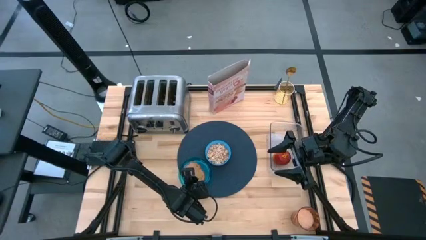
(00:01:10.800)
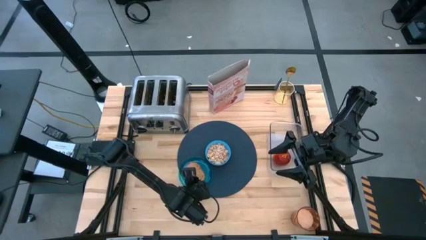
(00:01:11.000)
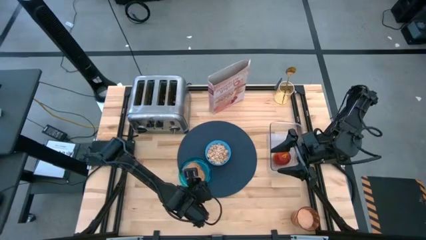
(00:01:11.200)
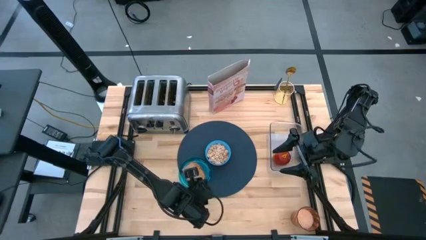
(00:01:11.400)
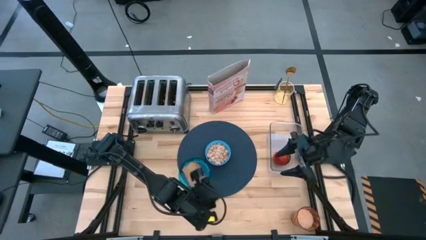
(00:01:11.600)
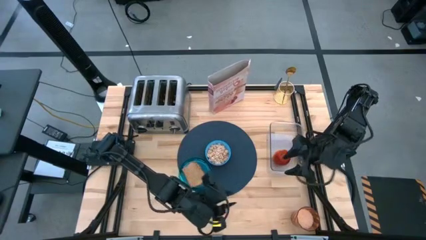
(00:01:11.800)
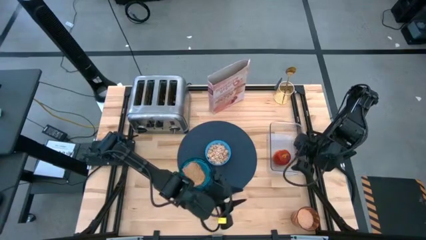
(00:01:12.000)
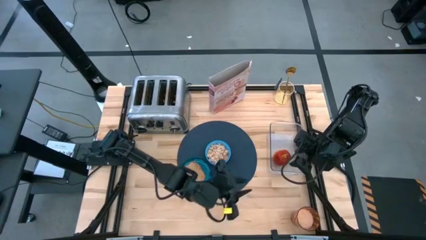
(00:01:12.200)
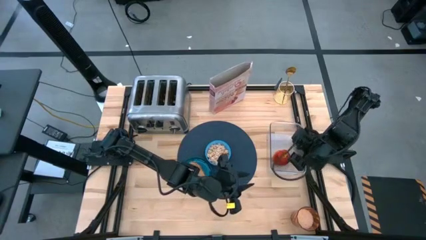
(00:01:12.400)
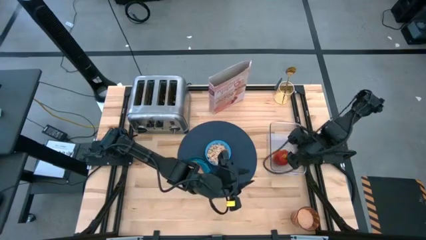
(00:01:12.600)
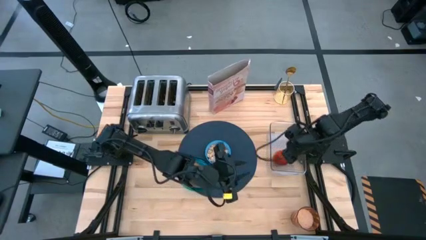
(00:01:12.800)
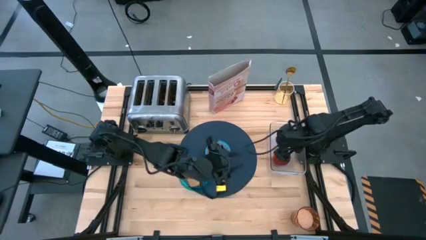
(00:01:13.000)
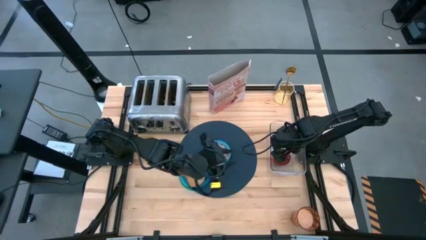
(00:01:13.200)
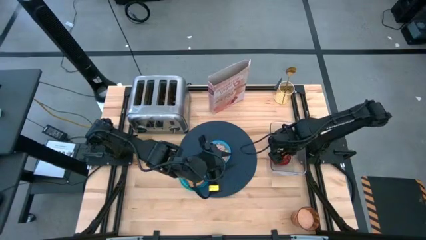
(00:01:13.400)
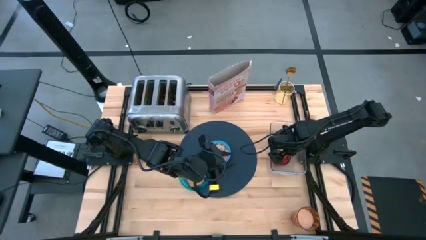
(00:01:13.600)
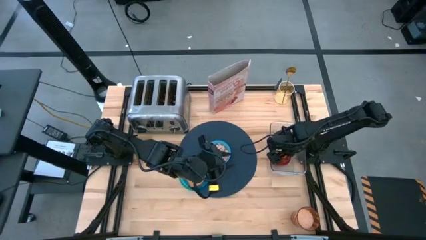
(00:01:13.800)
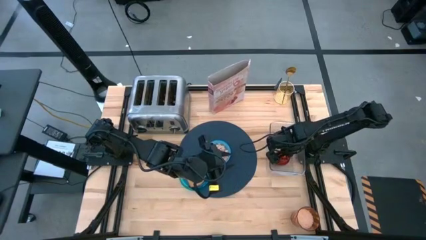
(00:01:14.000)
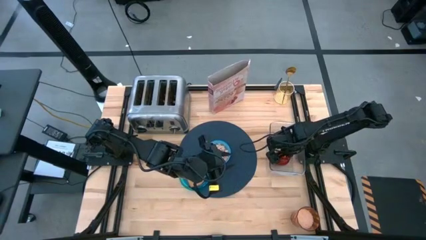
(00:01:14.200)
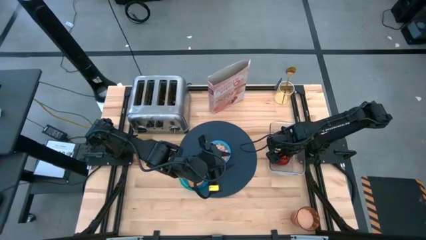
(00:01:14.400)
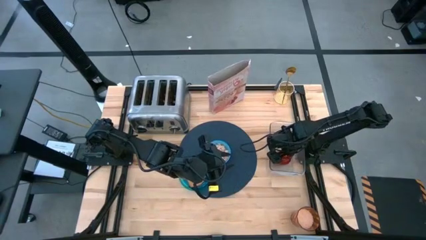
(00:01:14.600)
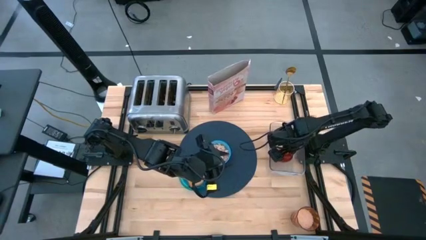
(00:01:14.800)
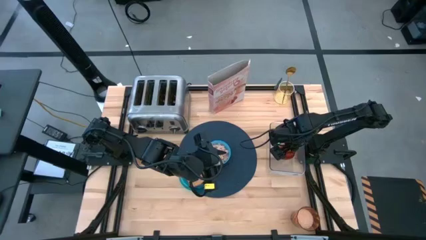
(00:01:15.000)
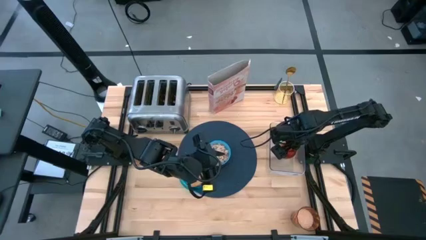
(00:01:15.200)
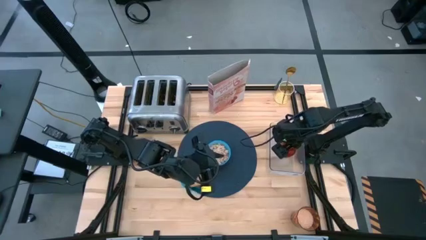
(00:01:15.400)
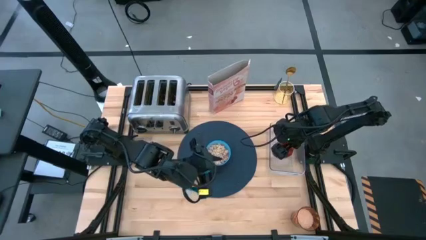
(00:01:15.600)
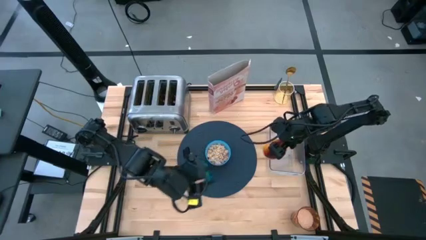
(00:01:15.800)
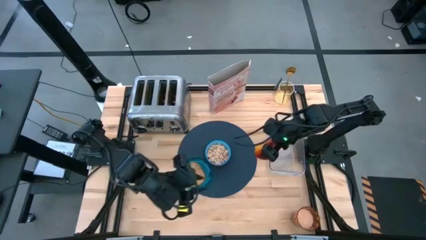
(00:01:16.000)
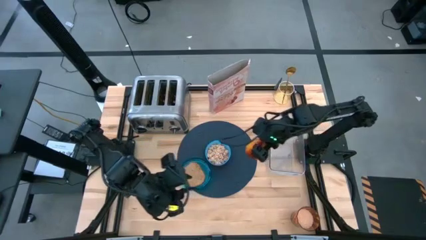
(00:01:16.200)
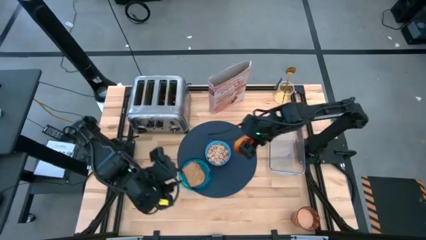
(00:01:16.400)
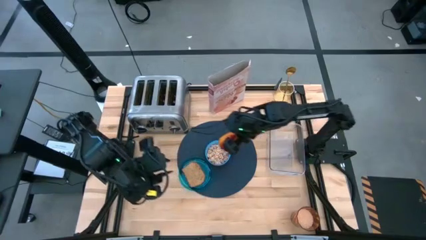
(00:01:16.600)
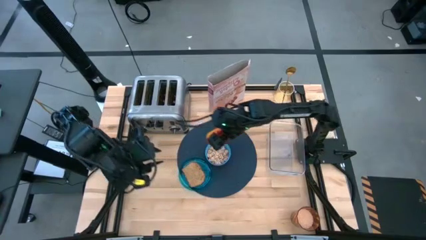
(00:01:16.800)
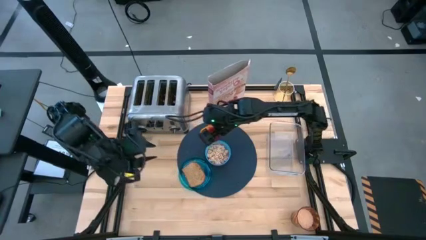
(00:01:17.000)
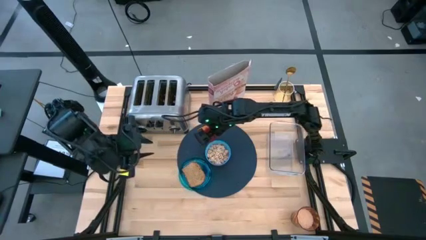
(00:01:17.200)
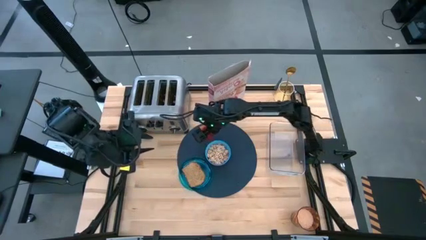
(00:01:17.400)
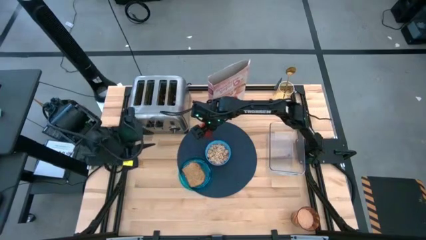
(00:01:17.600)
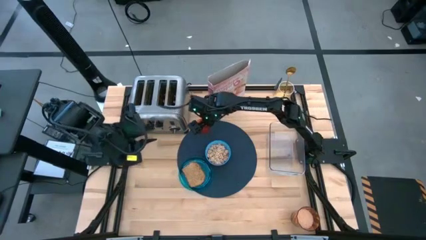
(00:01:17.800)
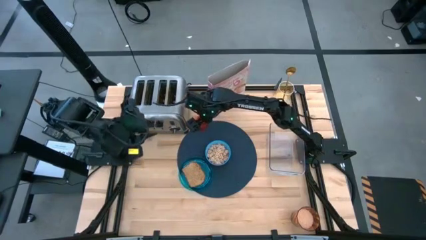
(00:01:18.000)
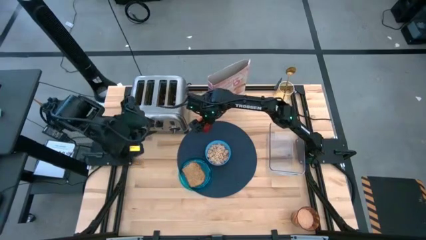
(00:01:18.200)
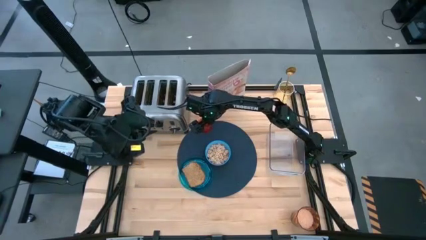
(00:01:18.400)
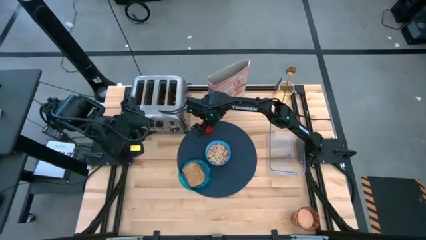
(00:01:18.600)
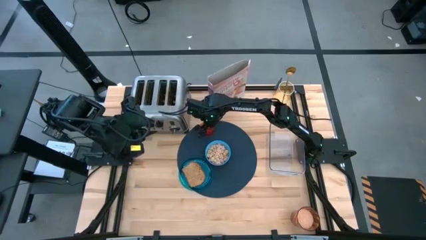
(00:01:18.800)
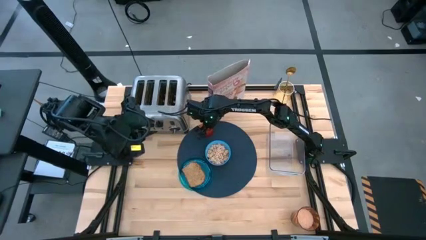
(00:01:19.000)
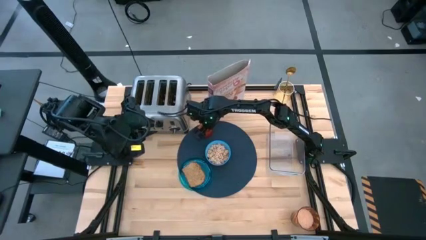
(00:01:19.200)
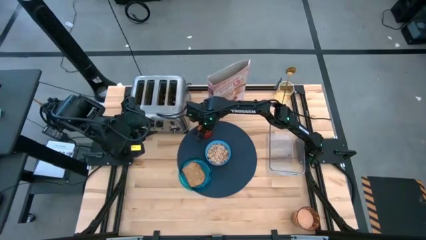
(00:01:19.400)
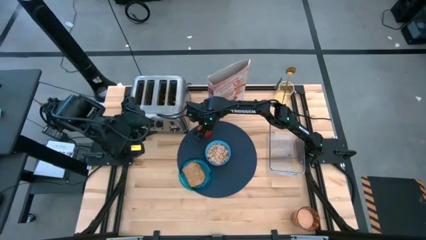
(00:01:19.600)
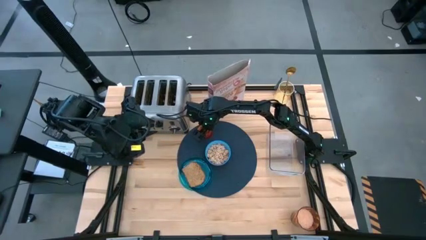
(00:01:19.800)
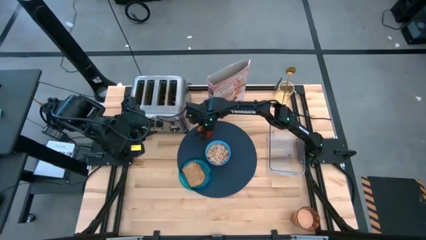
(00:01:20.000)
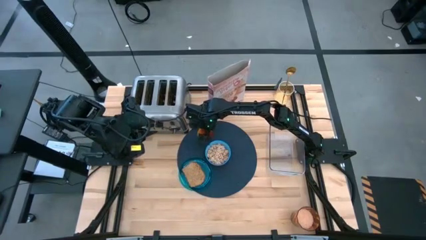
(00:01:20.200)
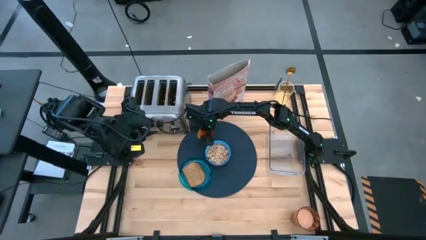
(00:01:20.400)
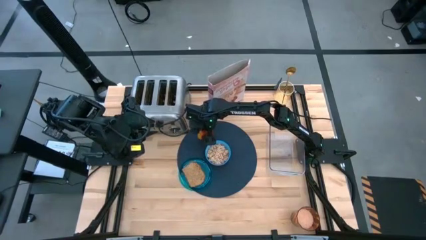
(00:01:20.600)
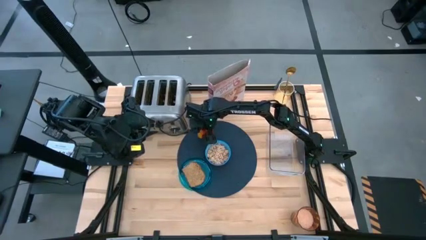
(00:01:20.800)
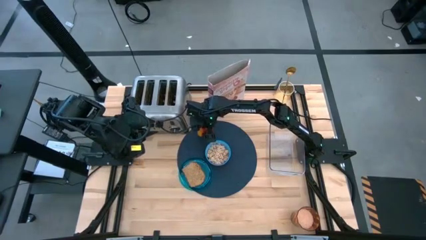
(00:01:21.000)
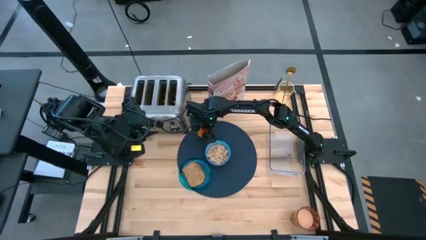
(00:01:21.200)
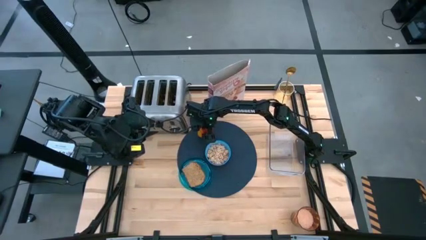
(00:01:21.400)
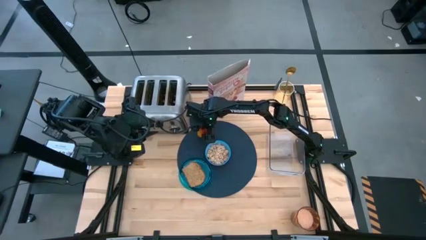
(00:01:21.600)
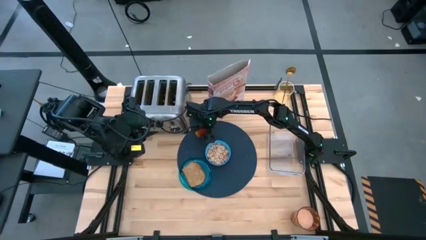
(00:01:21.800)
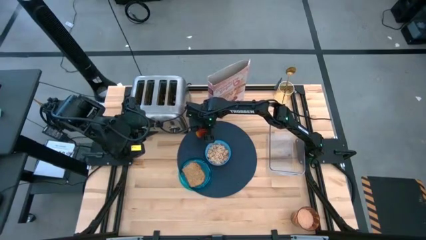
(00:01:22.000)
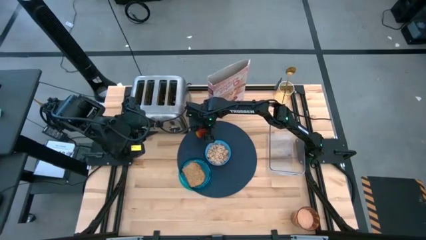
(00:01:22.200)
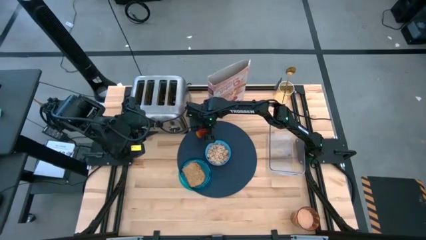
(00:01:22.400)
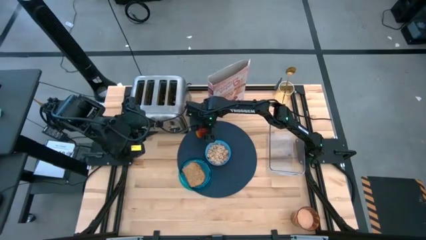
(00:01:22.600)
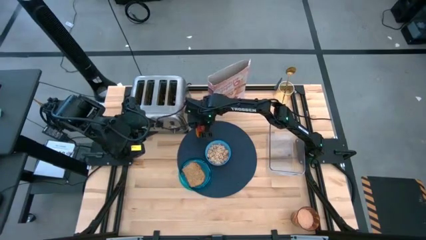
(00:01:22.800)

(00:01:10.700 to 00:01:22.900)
Task: Arrange a breakfast setting
Put the red apple on the blue table mat to the top left of the blue bowl
